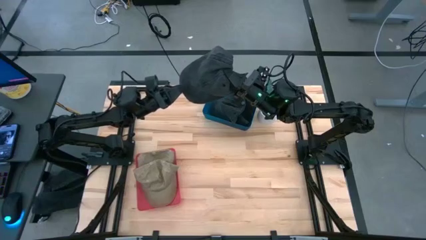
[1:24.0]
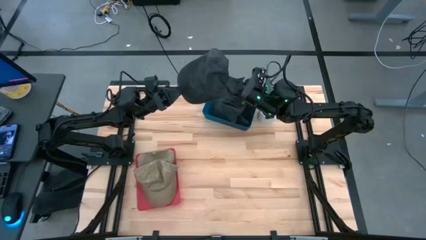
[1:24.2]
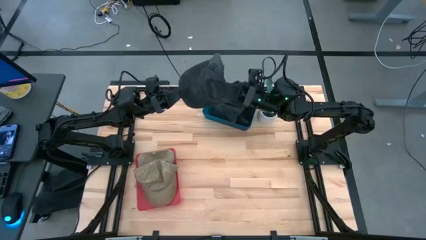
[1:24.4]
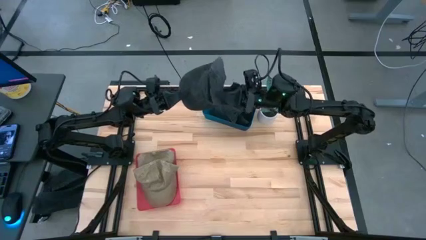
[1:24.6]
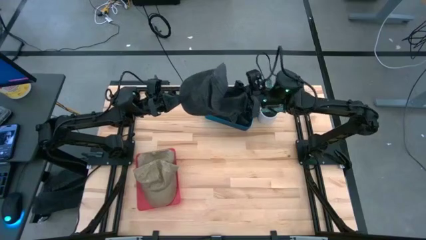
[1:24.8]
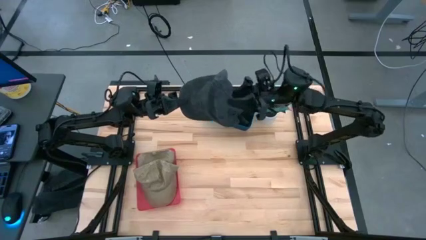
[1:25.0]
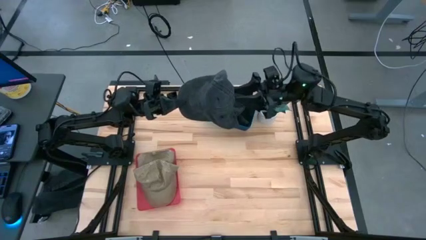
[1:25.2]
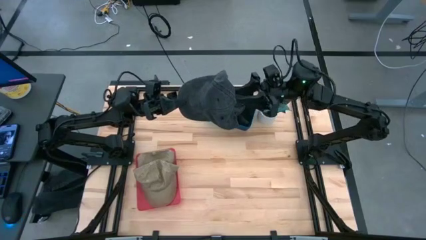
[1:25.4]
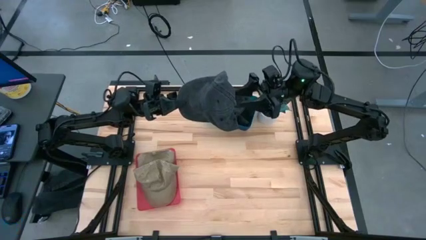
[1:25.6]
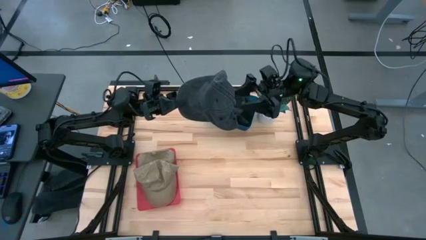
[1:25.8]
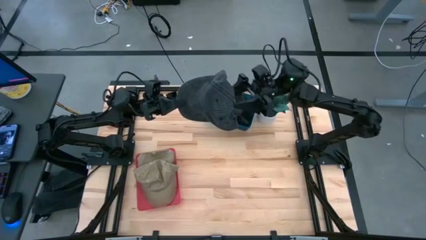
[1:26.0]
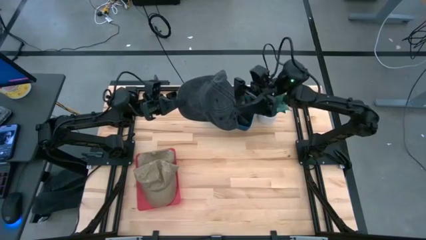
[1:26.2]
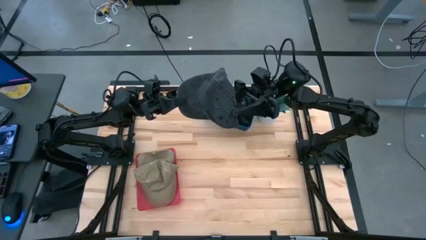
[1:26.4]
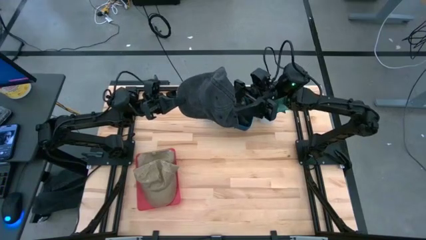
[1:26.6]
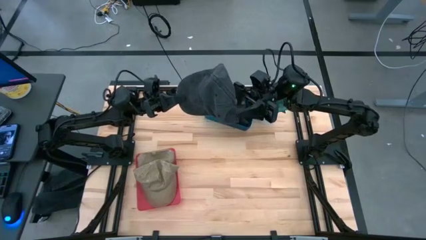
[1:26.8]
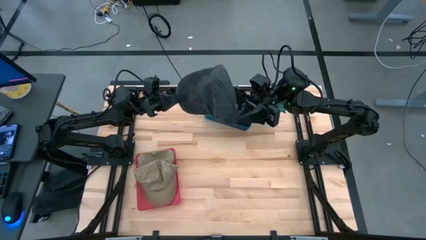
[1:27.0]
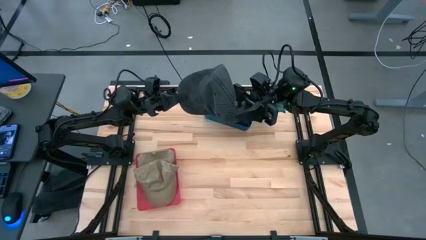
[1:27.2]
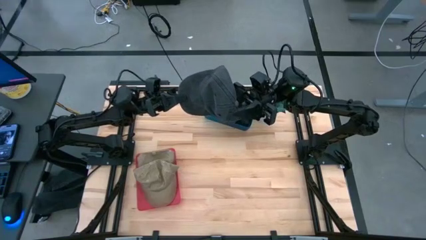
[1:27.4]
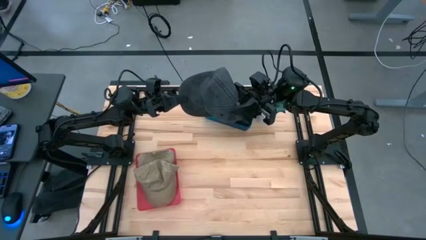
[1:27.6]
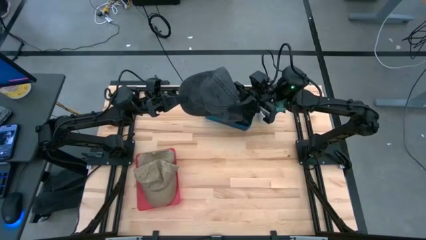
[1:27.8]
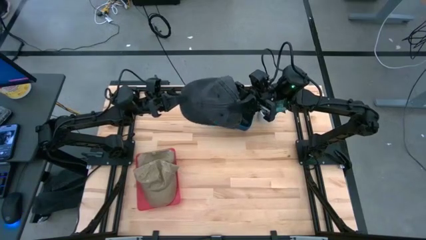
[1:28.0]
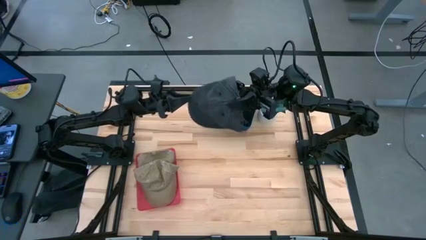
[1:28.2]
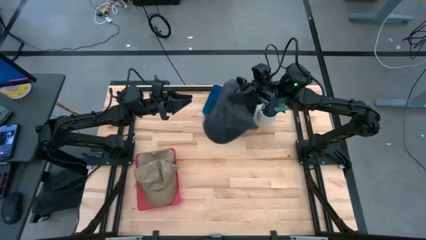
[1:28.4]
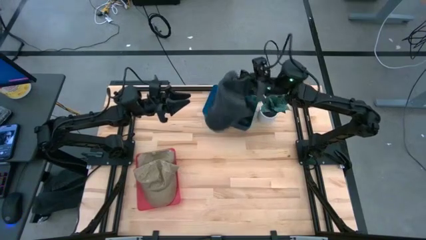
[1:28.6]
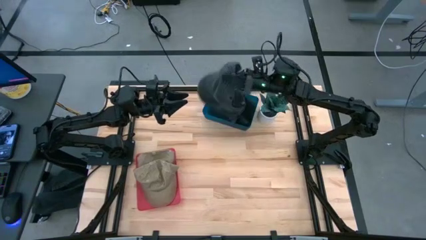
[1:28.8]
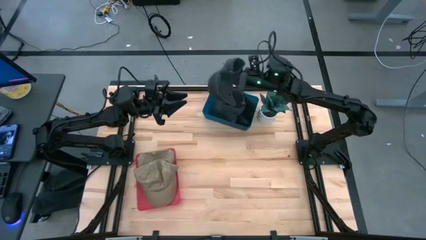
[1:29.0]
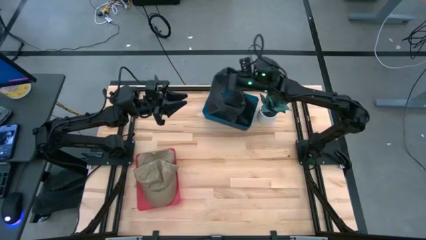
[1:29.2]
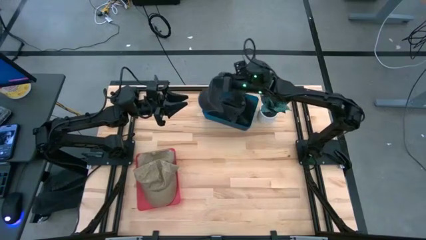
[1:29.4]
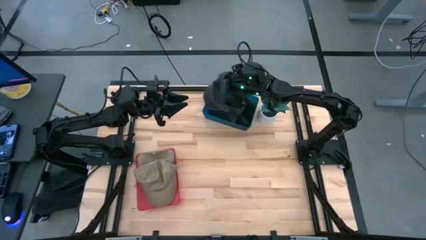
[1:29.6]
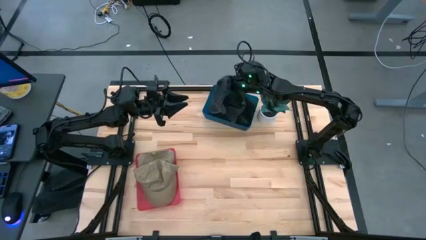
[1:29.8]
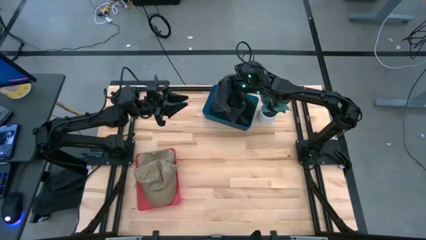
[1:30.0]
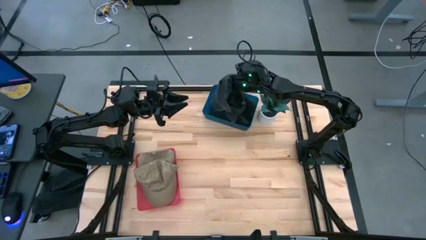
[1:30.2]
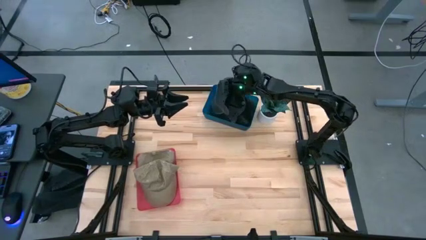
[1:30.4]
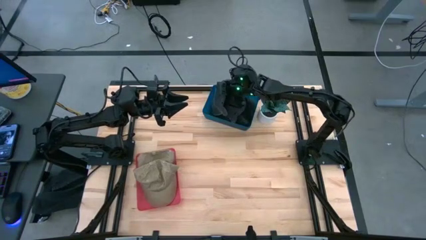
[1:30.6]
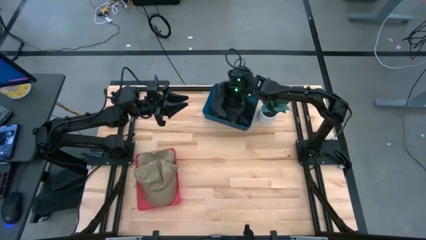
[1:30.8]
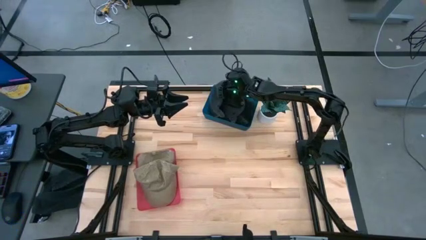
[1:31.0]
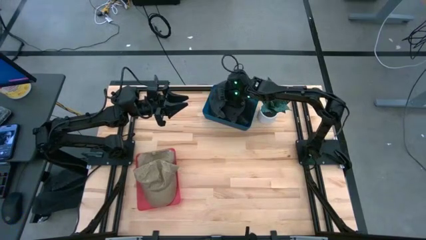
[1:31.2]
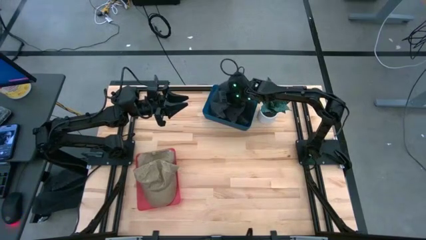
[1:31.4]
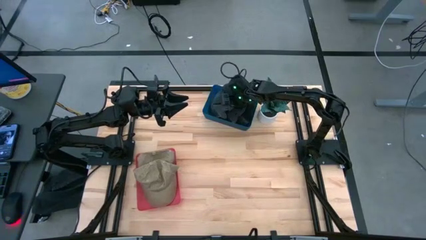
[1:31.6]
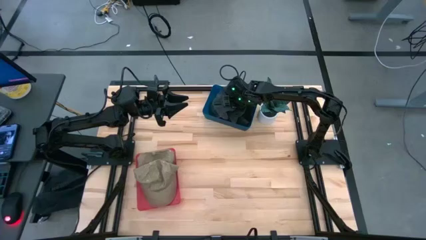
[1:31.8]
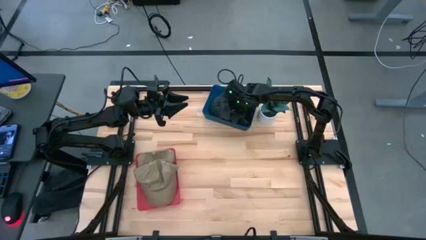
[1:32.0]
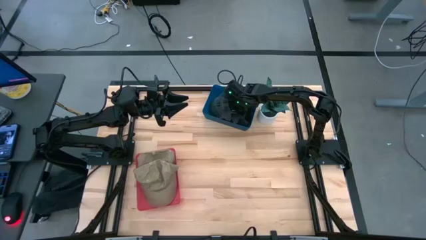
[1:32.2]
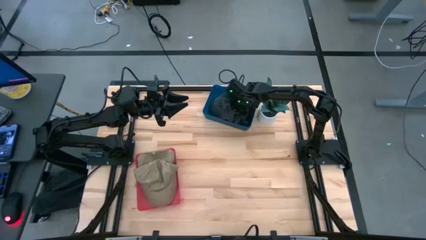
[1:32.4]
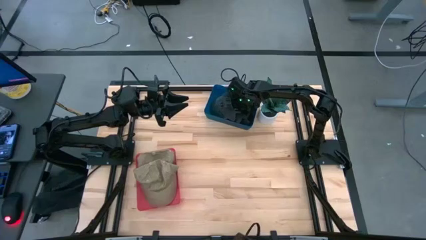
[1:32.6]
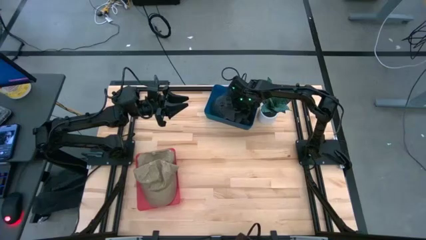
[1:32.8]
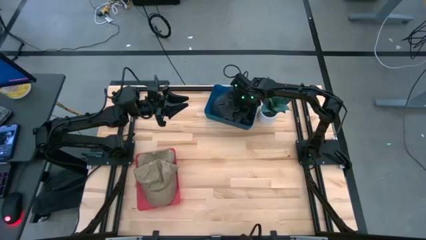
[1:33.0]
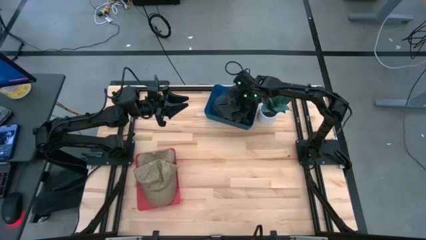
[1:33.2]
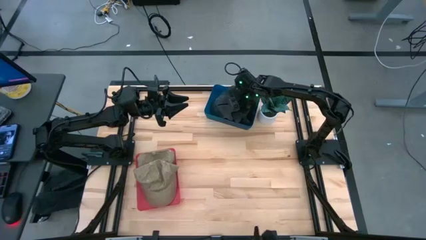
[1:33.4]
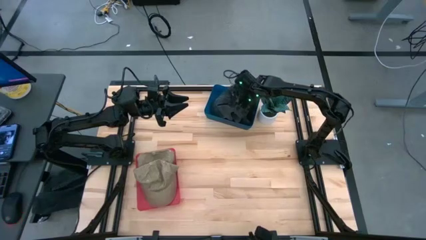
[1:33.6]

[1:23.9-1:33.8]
Task: Pick & Place hat
Put the black cap into the blue bin

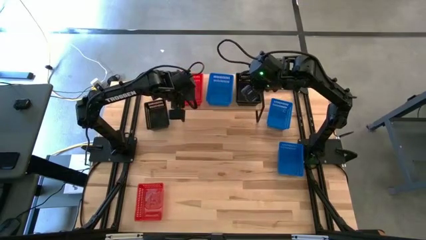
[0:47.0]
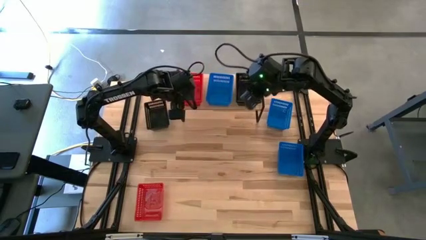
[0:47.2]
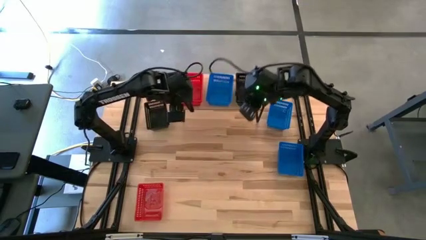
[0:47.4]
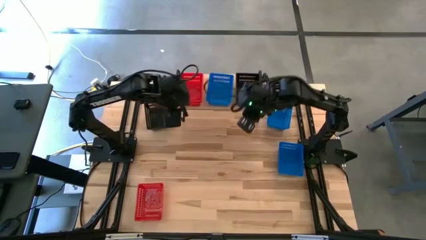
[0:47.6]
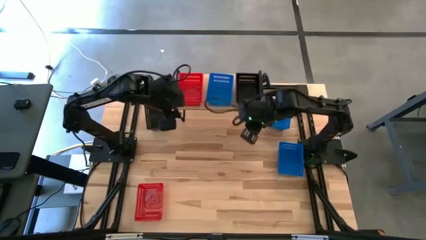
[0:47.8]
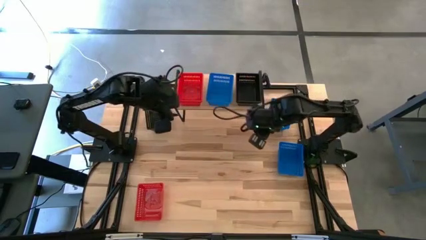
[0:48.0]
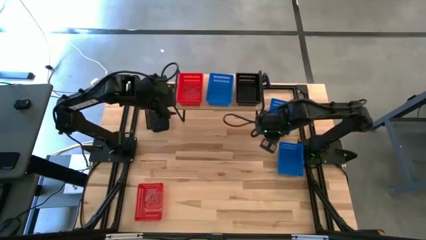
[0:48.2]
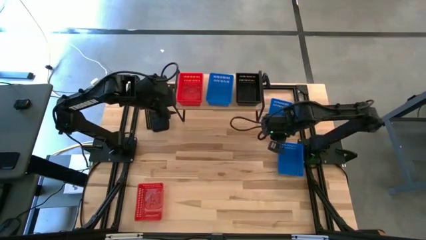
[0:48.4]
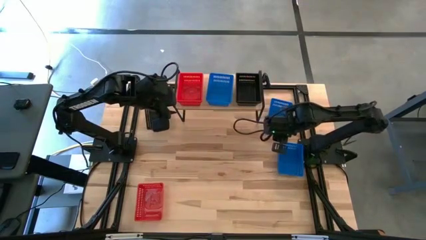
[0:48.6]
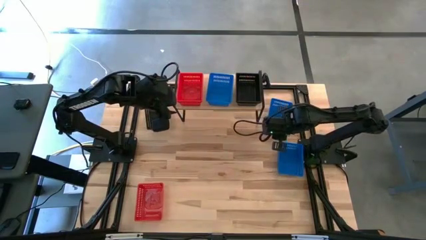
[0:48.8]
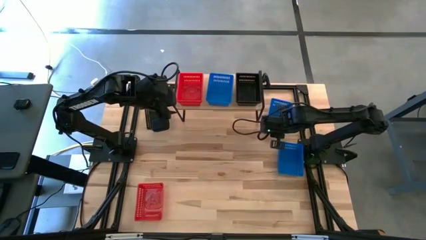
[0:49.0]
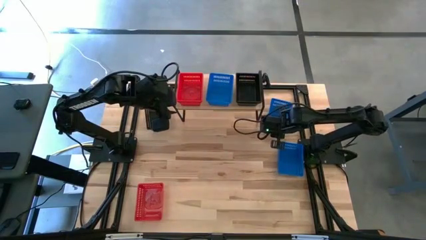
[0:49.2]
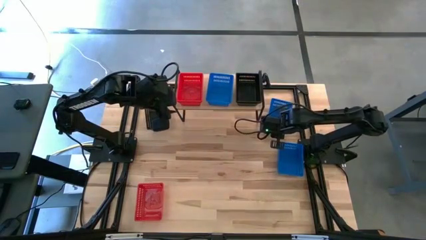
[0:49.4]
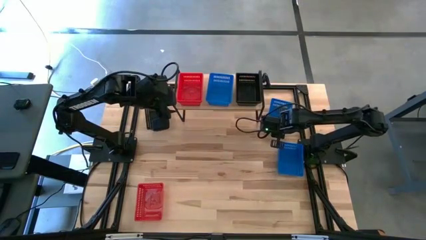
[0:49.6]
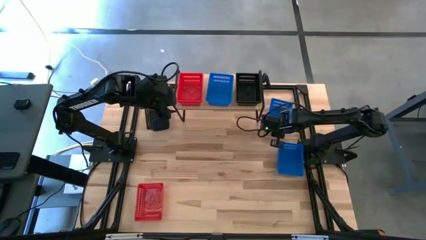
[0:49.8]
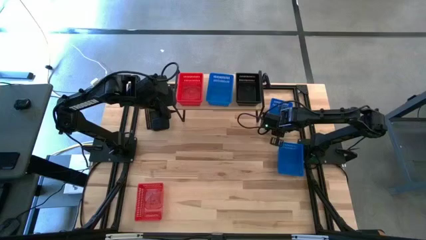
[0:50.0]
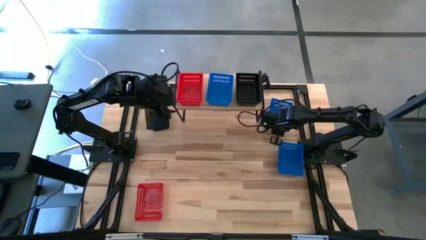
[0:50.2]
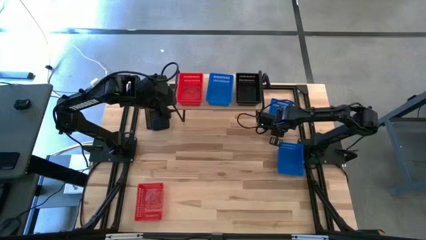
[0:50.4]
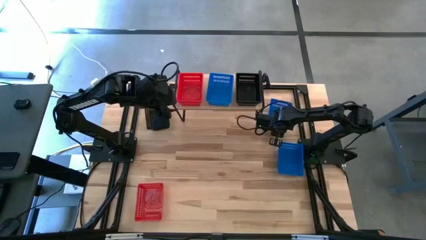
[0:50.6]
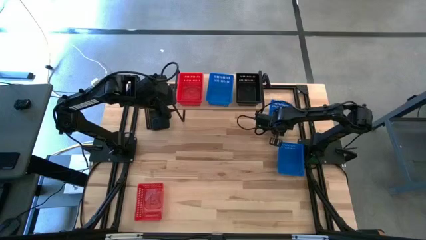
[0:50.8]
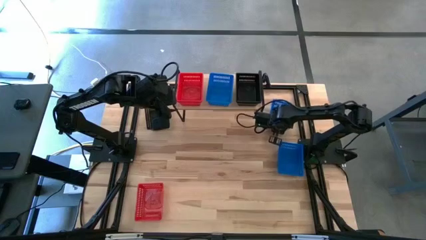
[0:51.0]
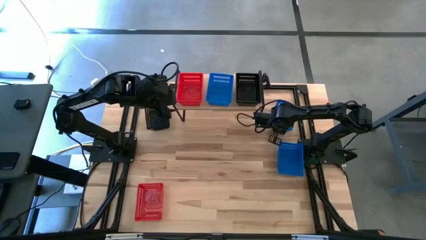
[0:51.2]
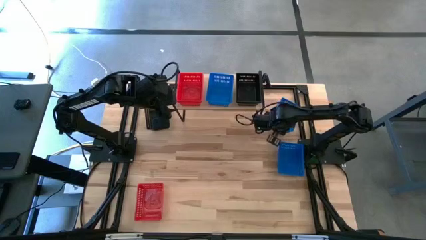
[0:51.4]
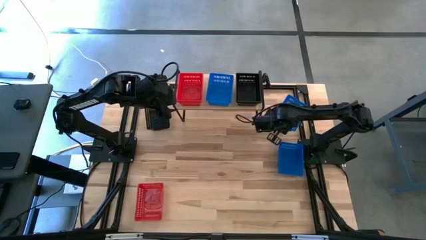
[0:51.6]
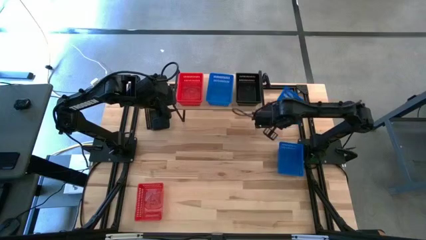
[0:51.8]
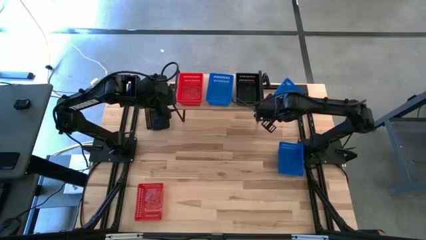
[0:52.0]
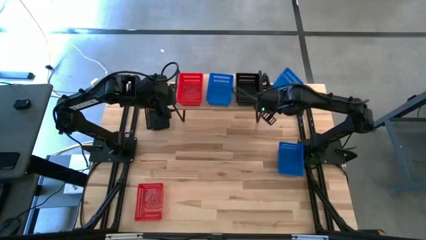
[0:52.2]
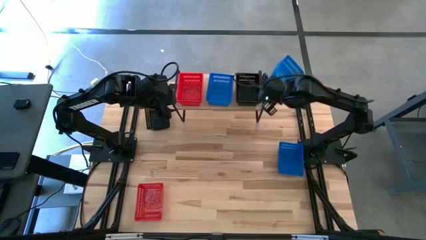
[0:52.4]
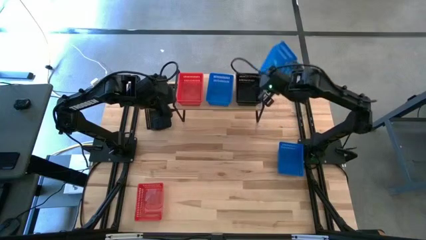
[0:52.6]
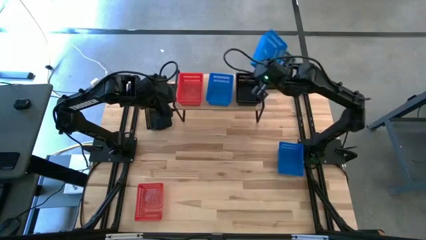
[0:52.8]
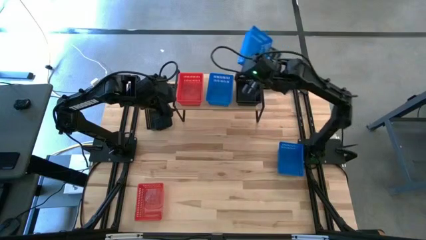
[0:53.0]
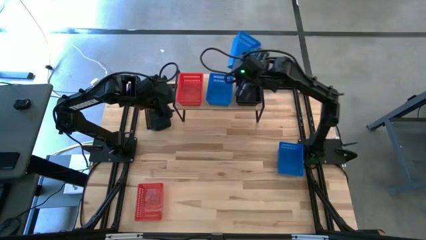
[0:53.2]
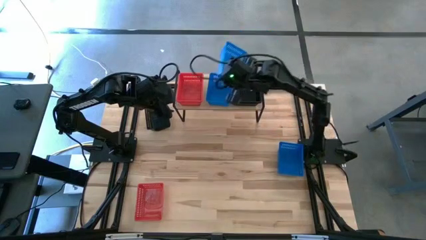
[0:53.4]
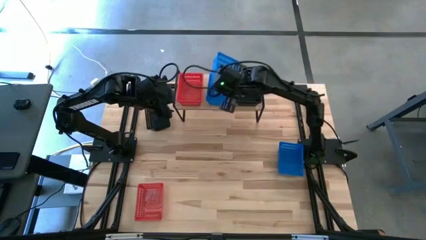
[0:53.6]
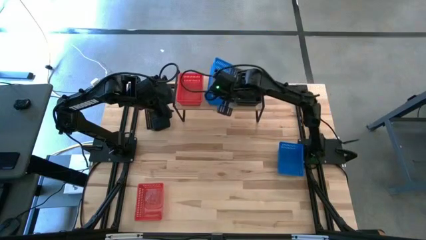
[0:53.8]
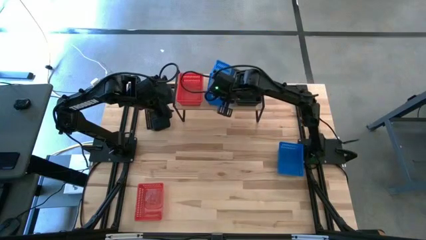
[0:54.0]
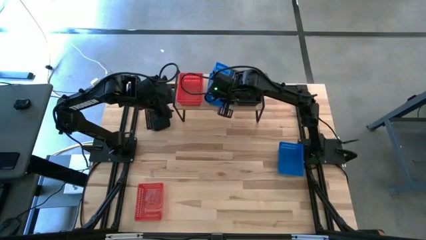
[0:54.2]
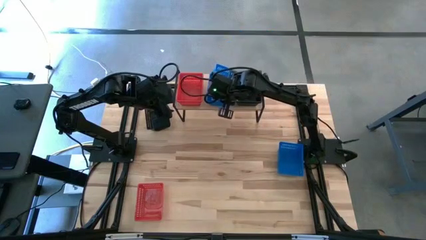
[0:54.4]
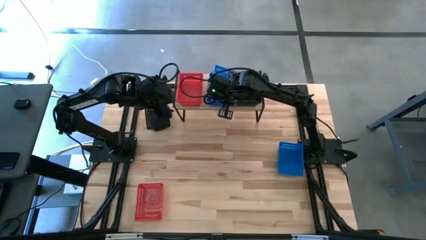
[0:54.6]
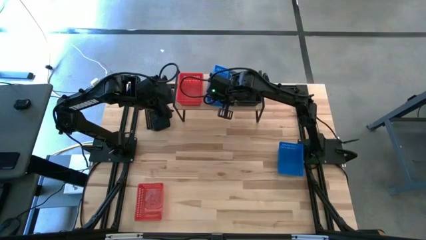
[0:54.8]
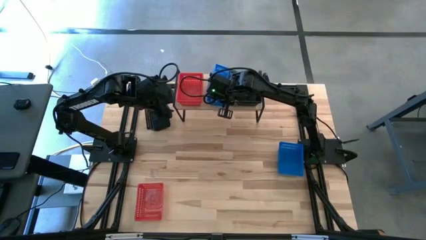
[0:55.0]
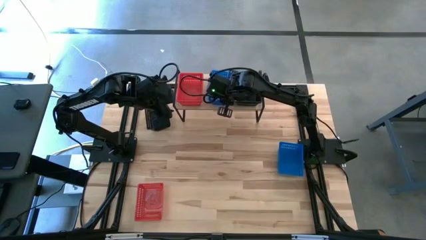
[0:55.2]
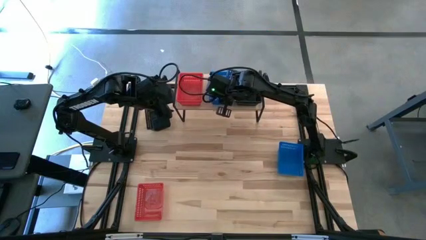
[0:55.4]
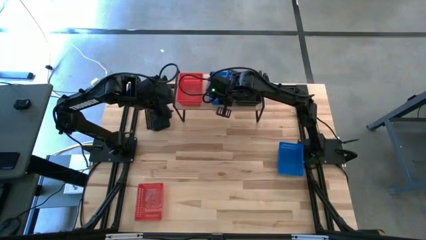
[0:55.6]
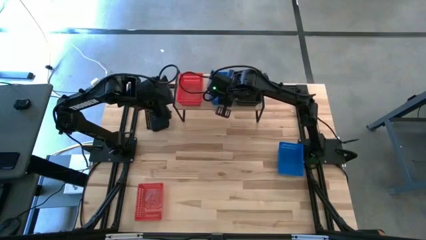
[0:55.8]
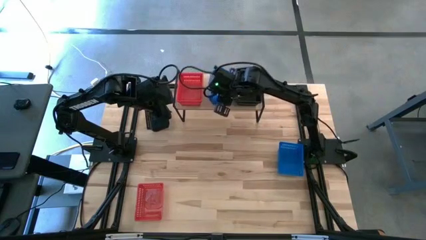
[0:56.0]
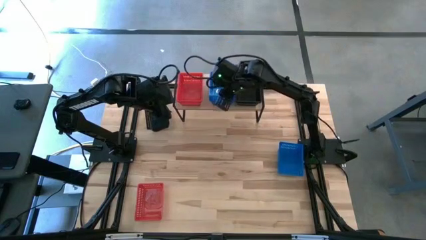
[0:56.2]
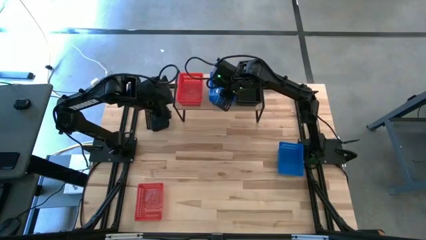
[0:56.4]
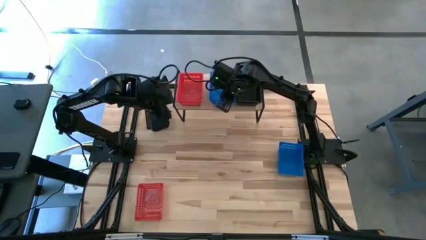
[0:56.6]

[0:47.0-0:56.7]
Task: Stack baskets on shelf by color
Stack the top blue basket on top of the blue basket on the shelf
